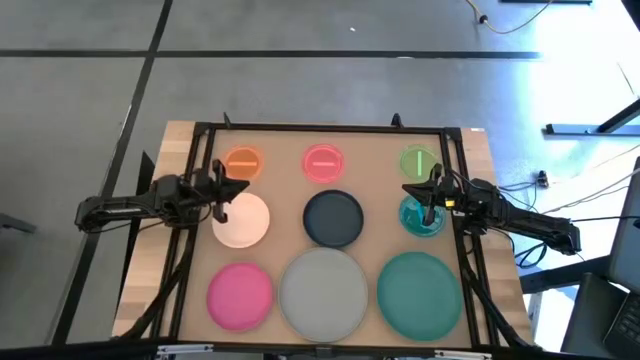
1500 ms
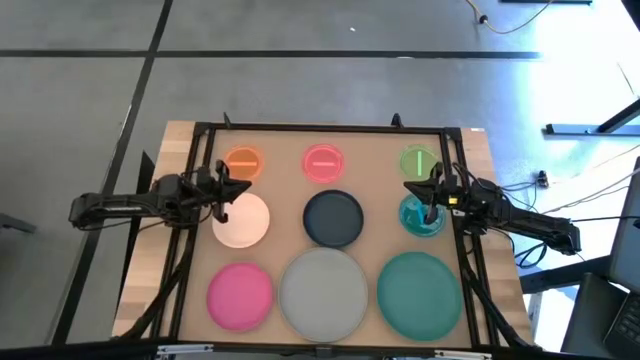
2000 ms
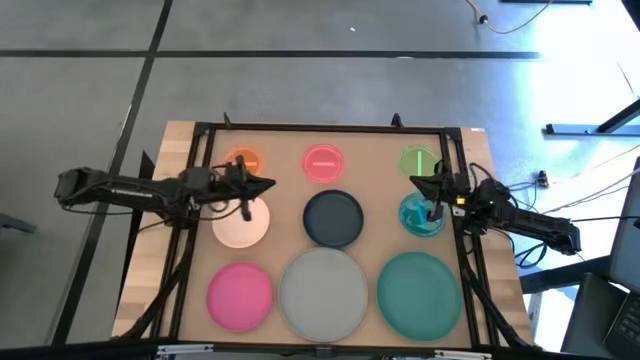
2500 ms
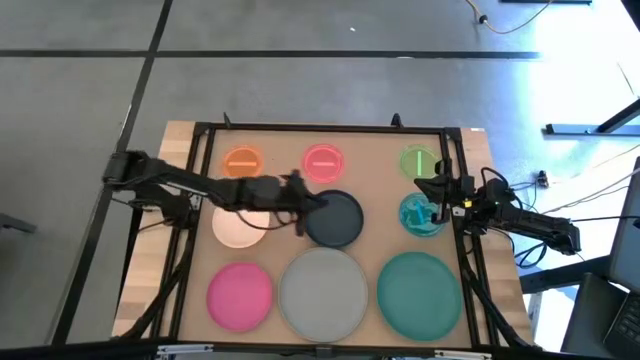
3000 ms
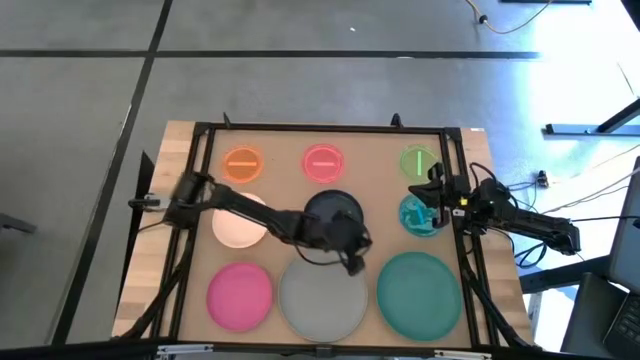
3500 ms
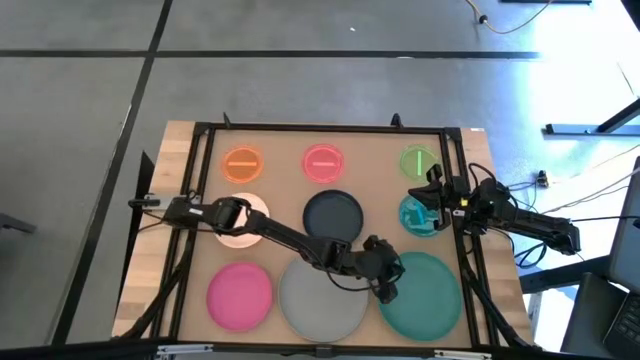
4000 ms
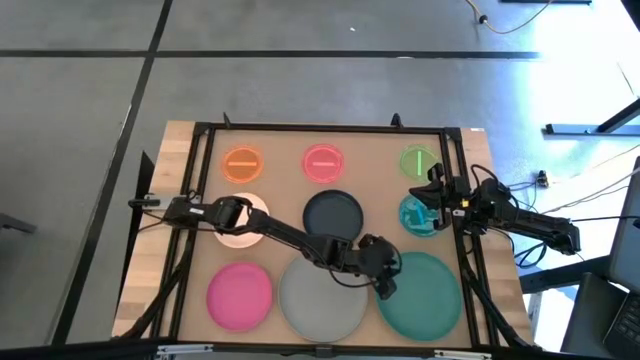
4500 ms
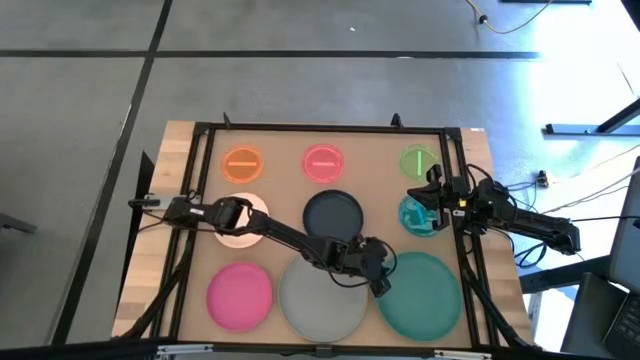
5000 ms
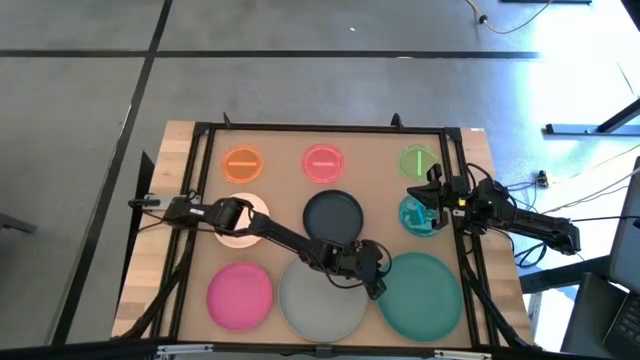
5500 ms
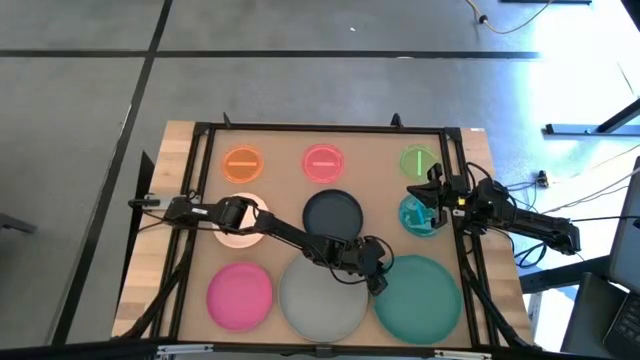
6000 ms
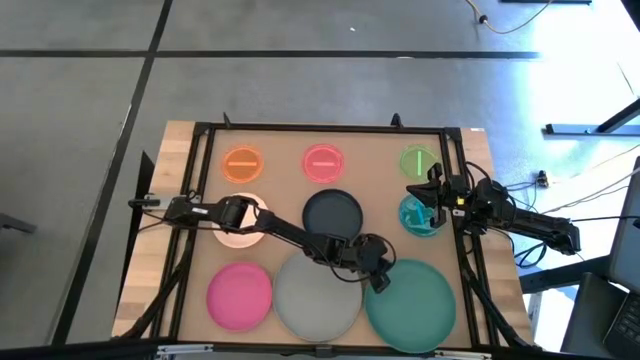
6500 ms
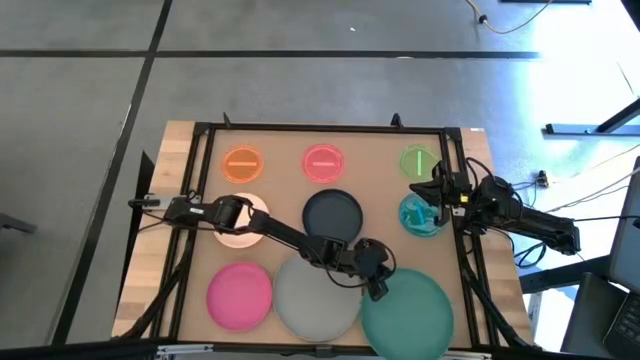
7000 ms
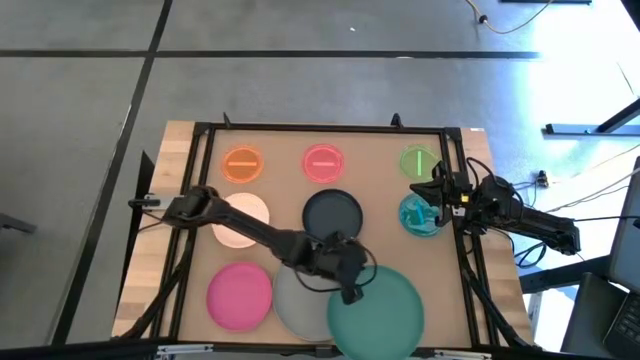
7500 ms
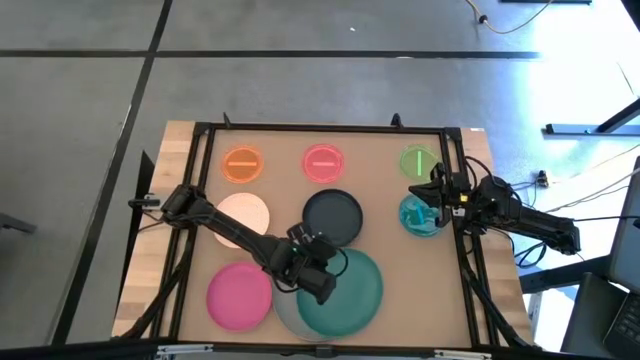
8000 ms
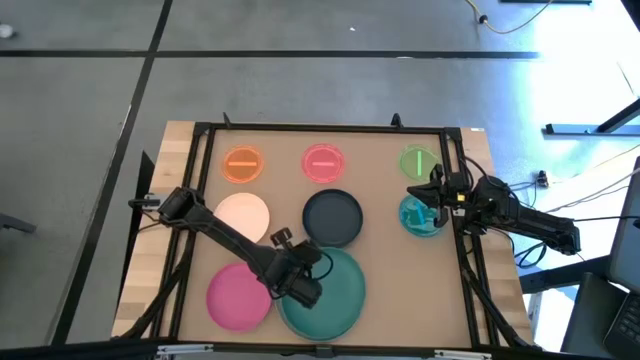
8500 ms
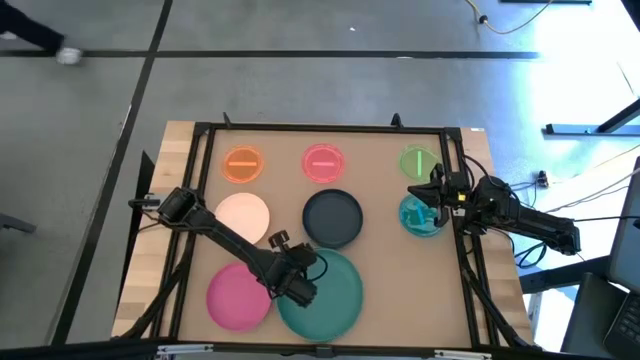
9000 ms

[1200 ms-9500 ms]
Task: Stack plastic plates
Stack the dark green plate on top of the gray plate

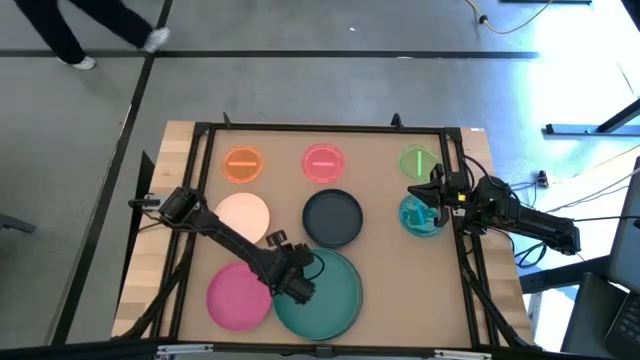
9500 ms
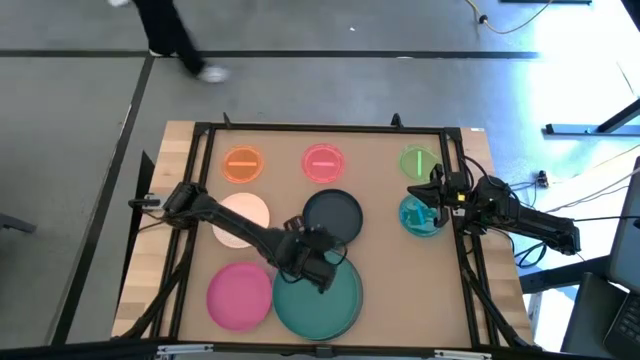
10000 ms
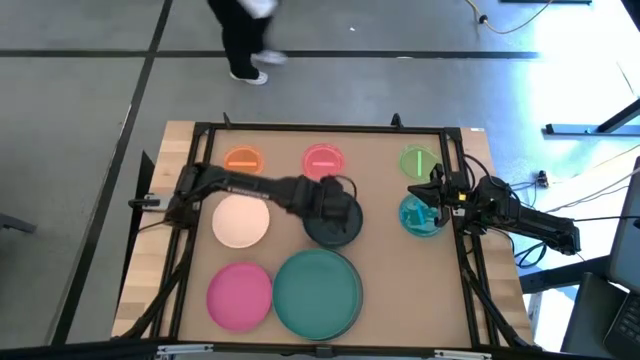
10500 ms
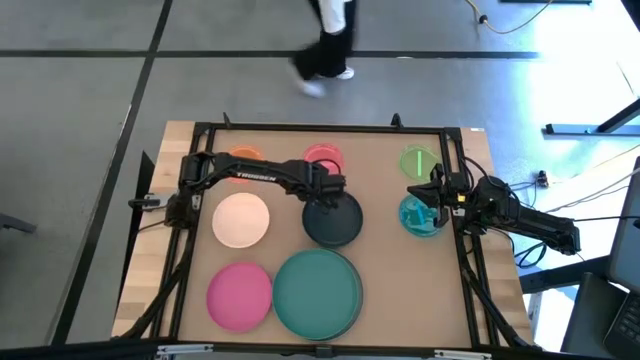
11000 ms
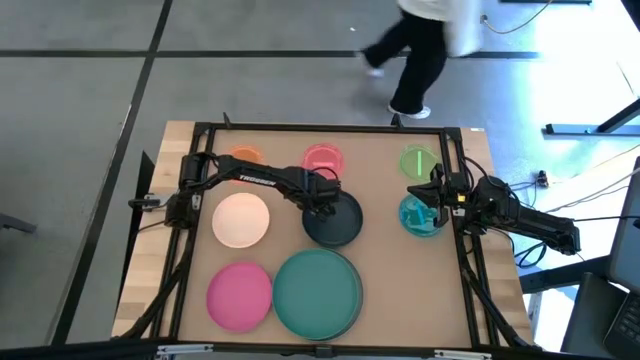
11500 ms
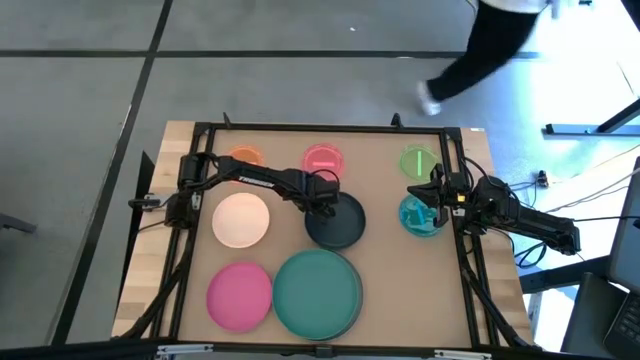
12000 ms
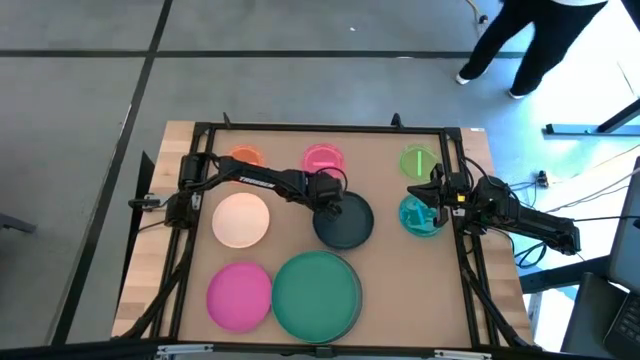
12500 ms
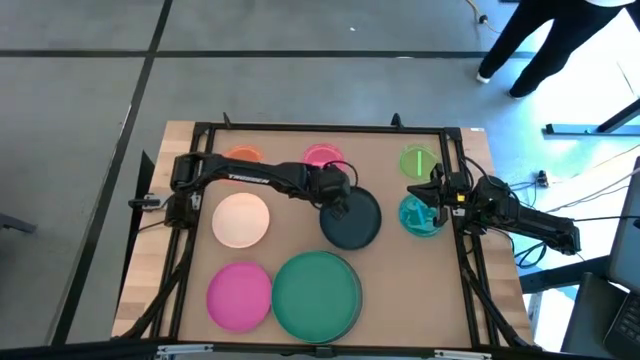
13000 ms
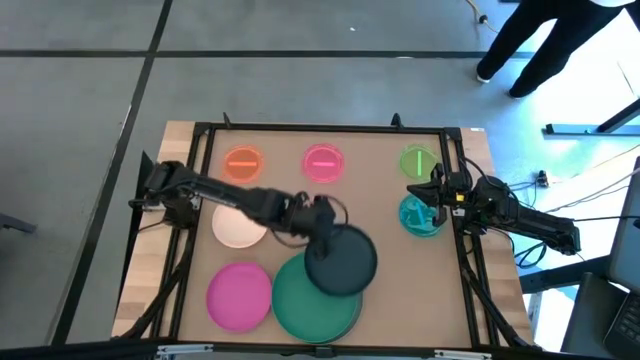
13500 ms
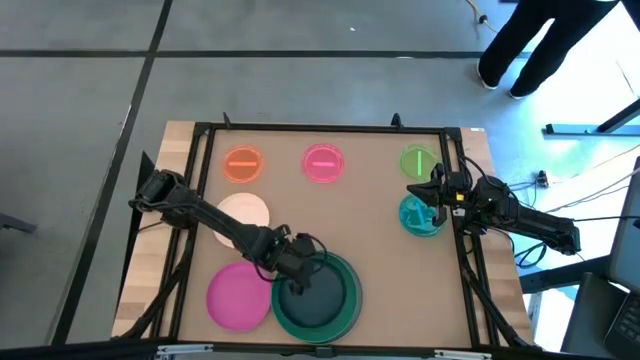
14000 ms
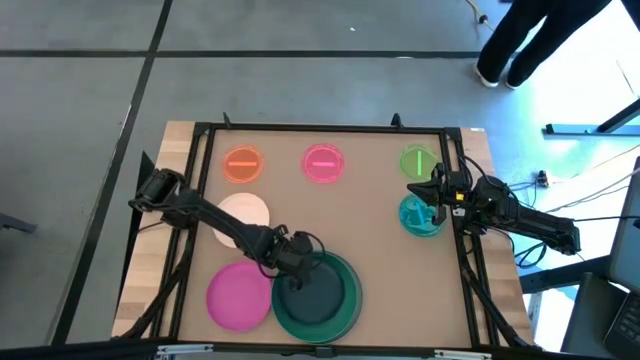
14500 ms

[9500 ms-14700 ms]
Stack the dark blue plate on top of the dark green plate

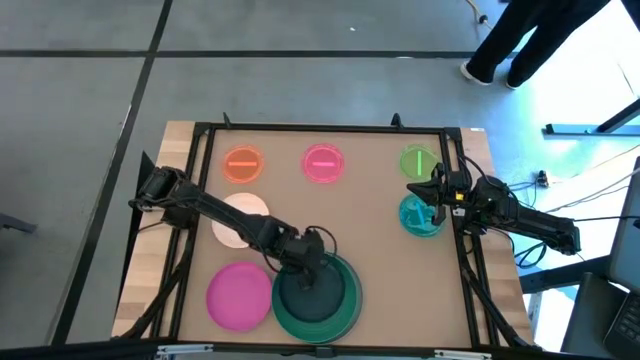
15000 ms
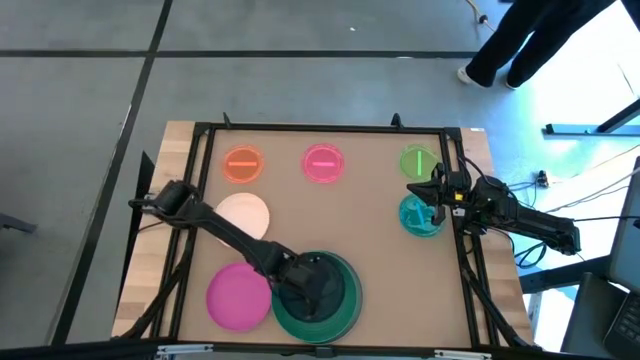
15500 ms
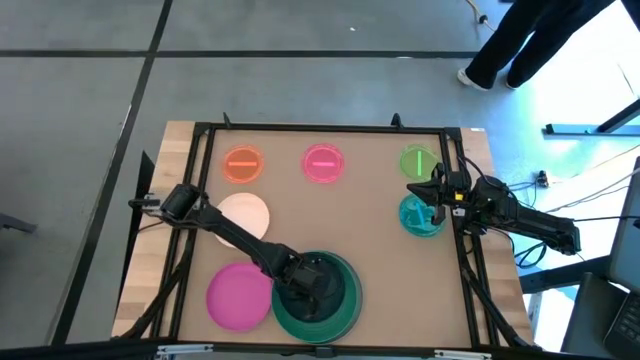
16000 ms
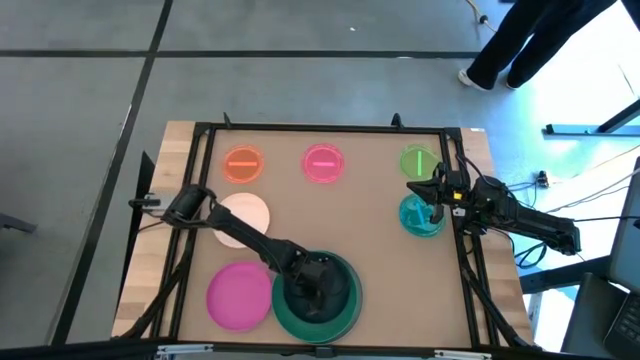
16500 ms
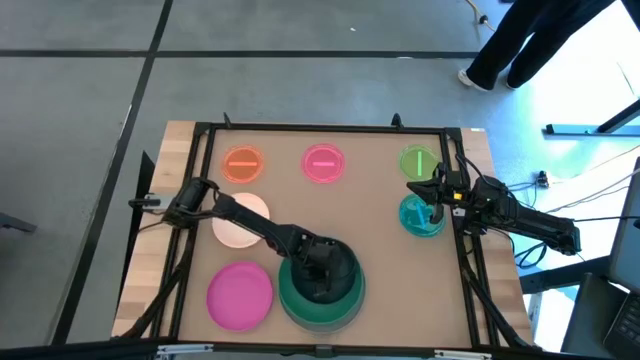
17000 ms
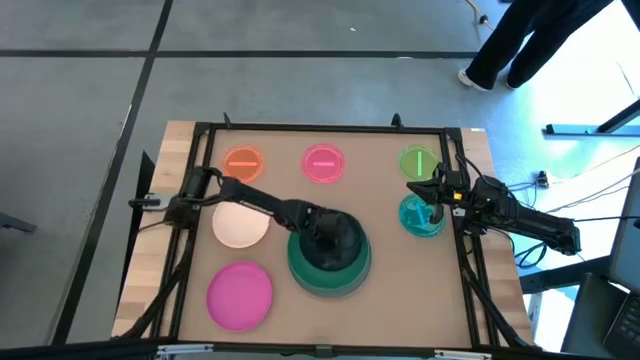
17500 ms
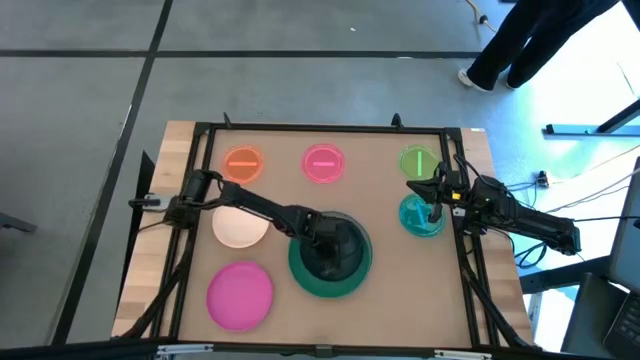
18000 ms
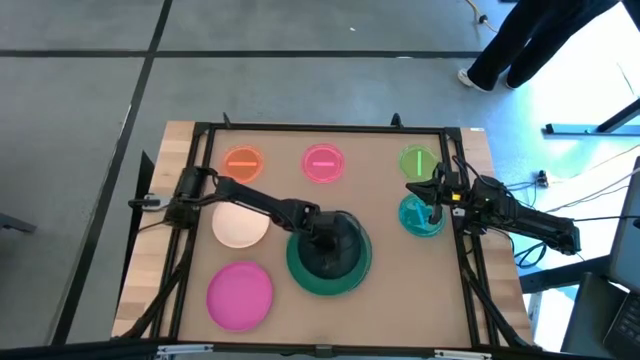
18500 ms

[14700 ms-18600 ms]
Adjust the stacked colored plates

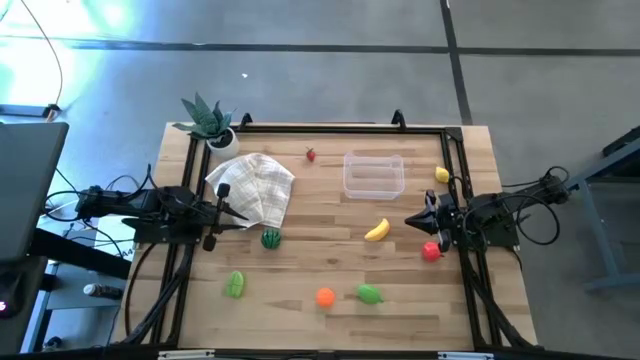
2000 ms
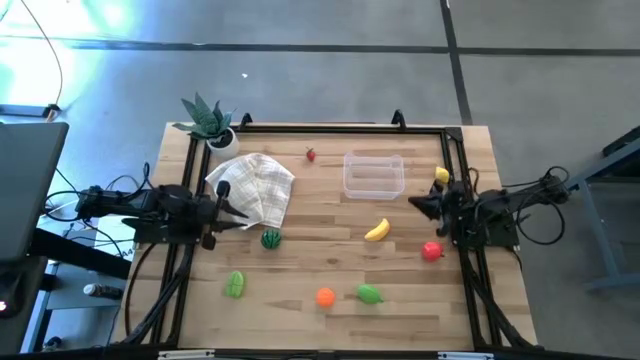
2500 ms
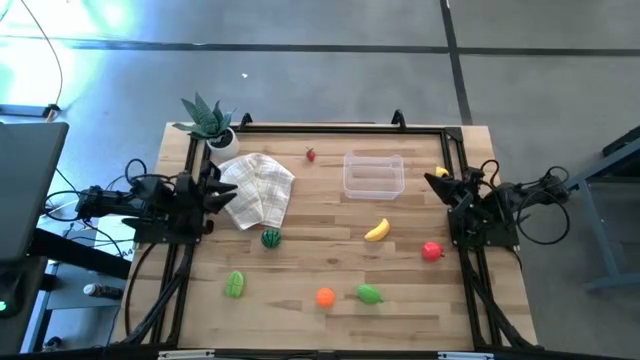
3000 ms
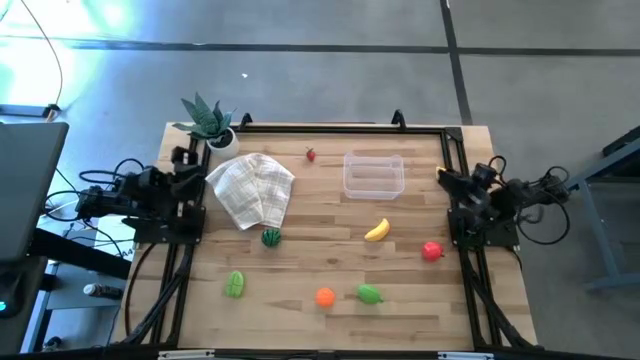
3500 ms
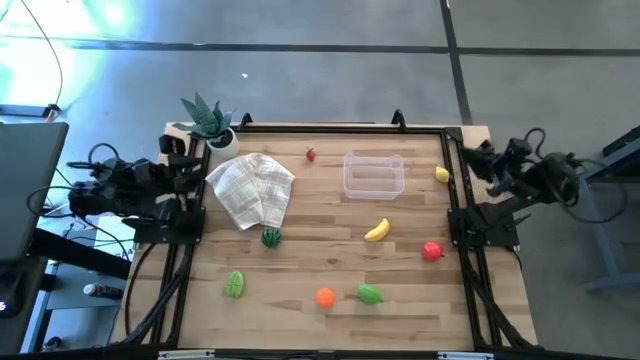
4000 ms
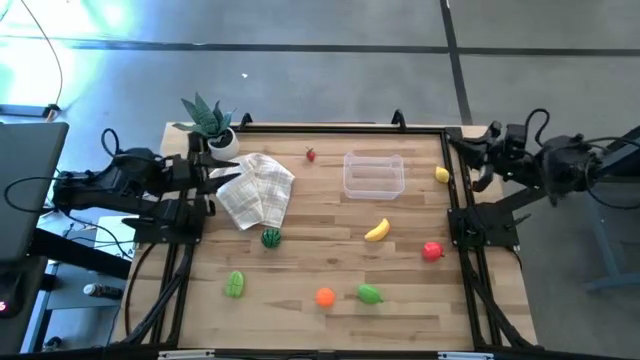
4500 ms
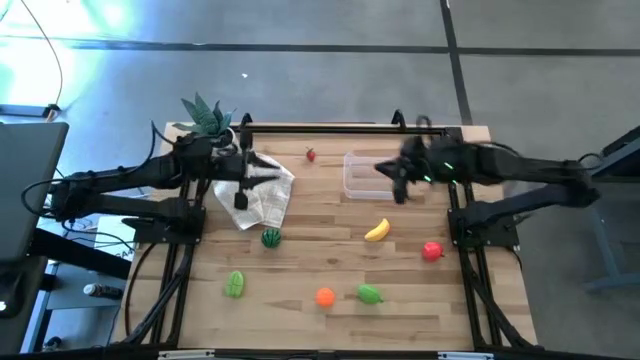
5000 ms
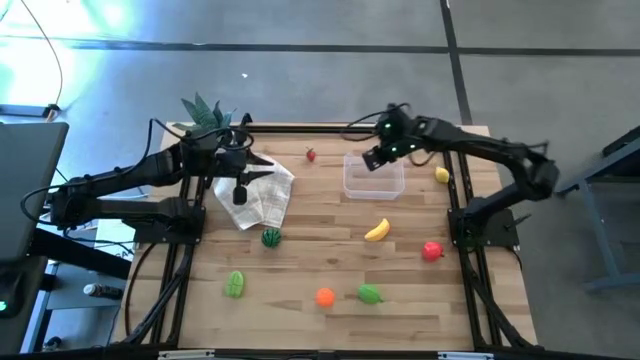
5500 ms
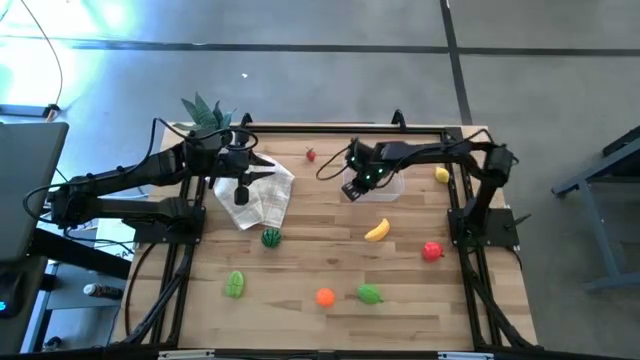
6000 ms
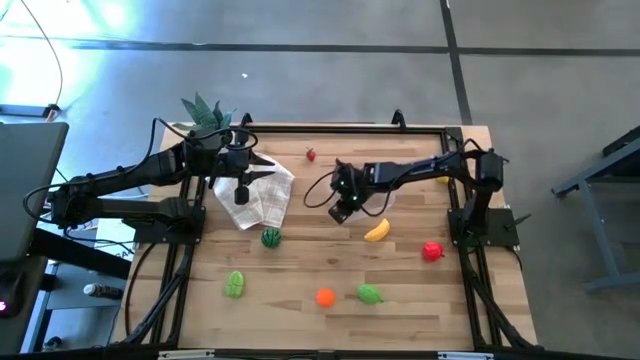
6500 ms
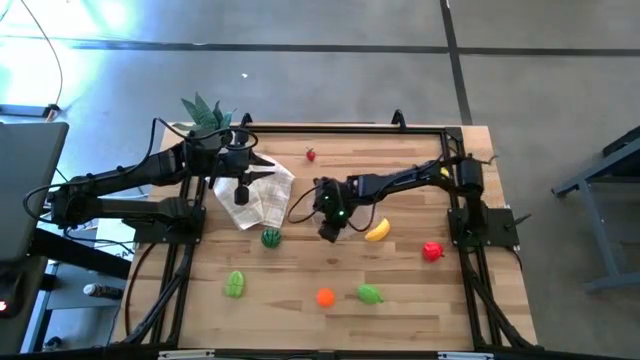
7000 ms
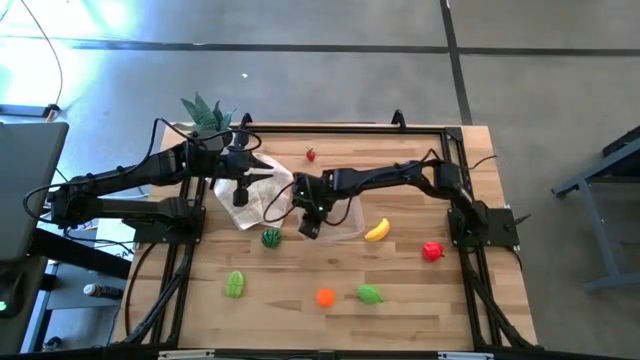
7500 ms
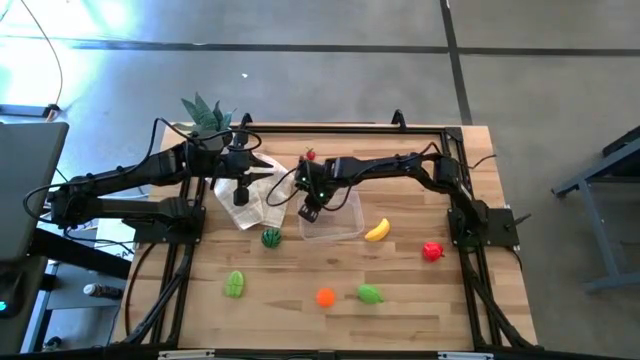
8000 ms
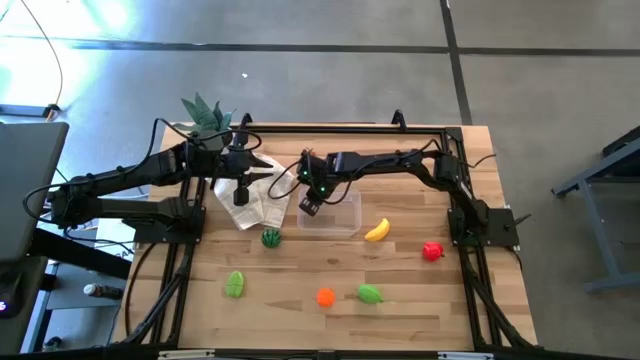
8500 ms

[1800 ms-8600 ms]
Task: Pick and placing Produce into tupperware
Prepare the transparent container
